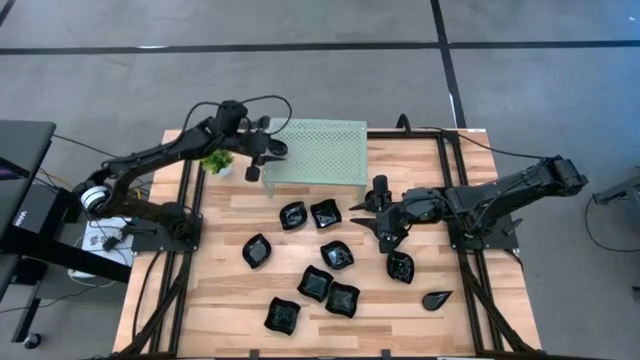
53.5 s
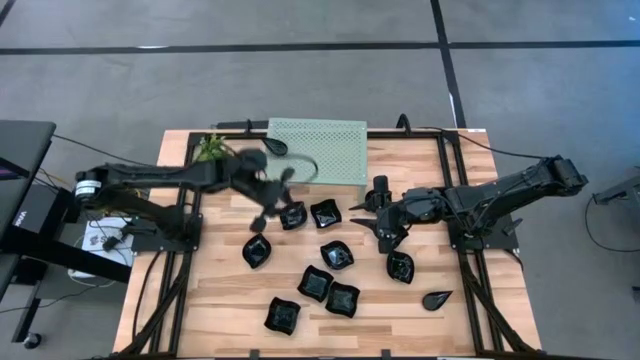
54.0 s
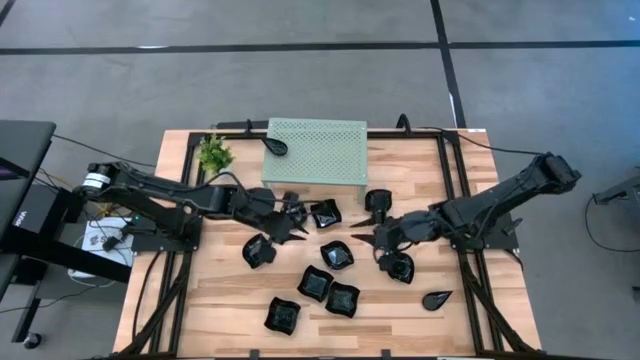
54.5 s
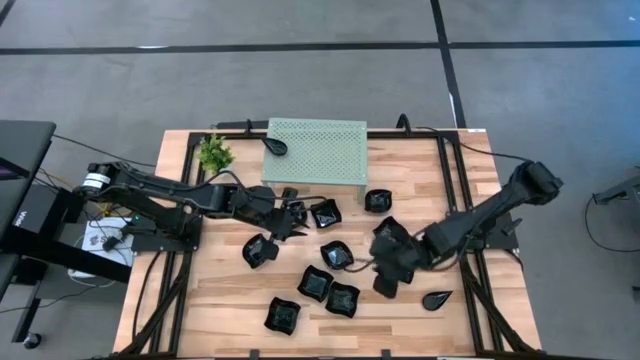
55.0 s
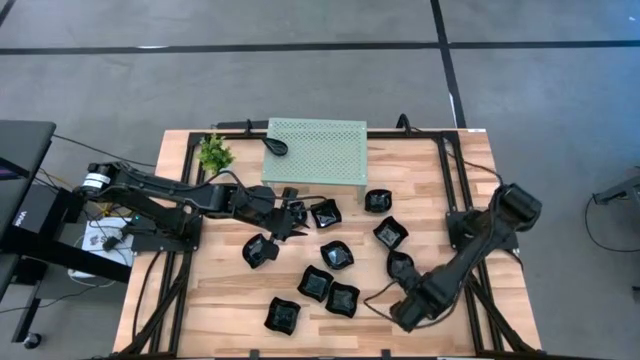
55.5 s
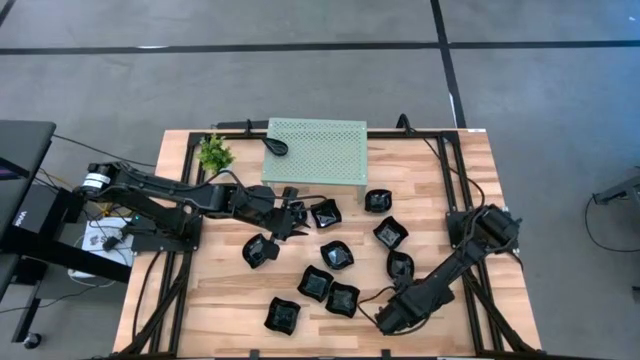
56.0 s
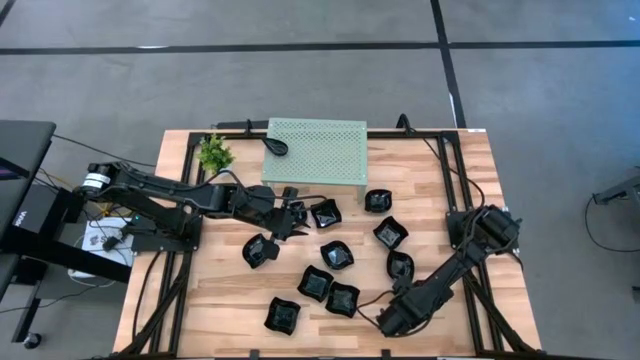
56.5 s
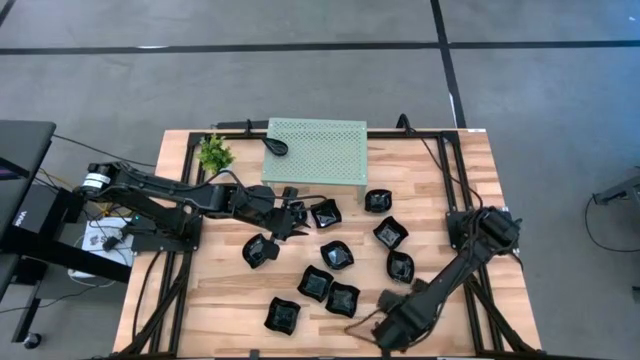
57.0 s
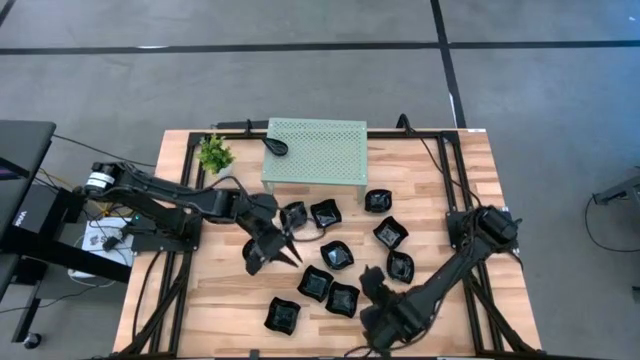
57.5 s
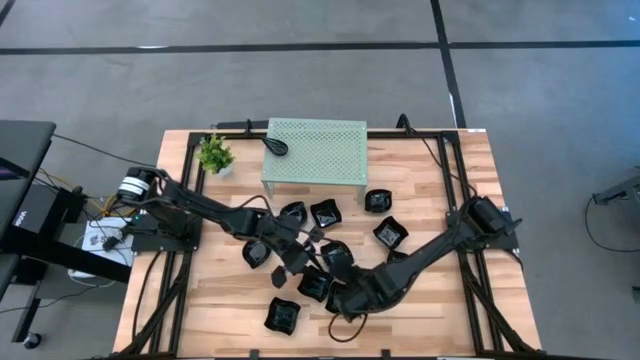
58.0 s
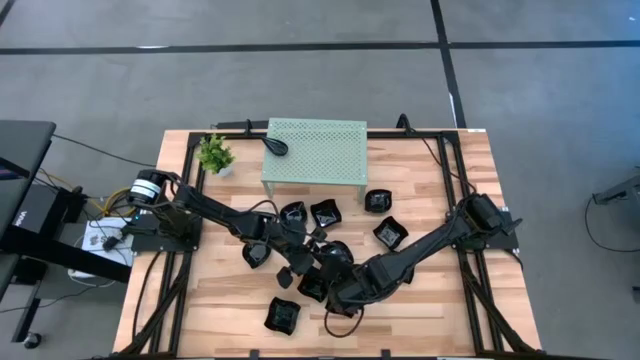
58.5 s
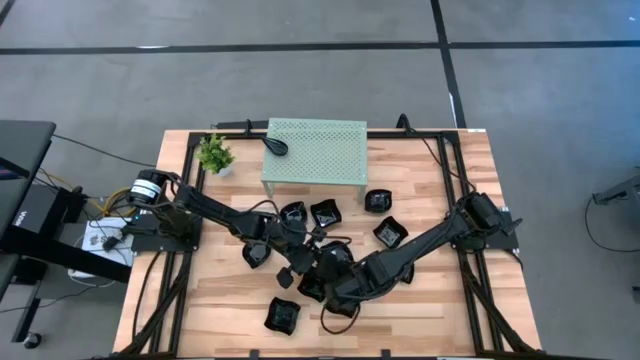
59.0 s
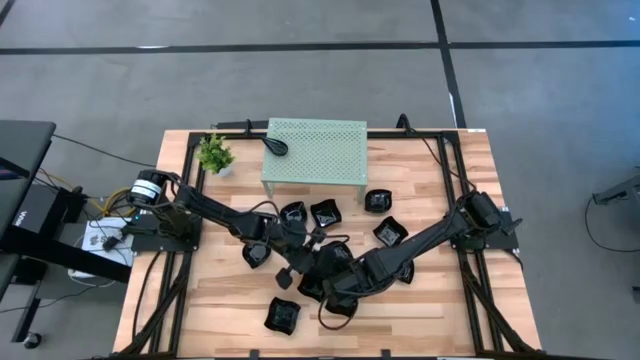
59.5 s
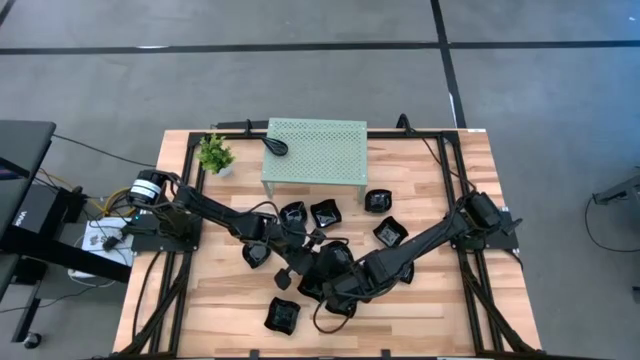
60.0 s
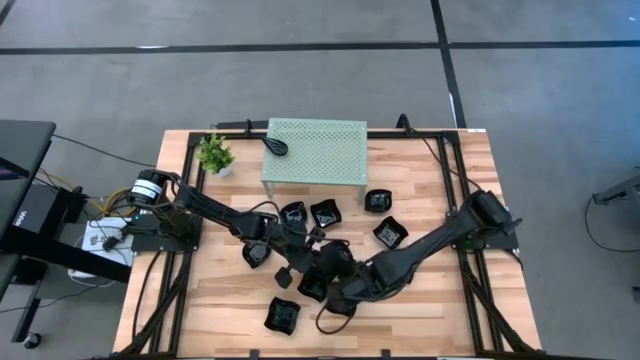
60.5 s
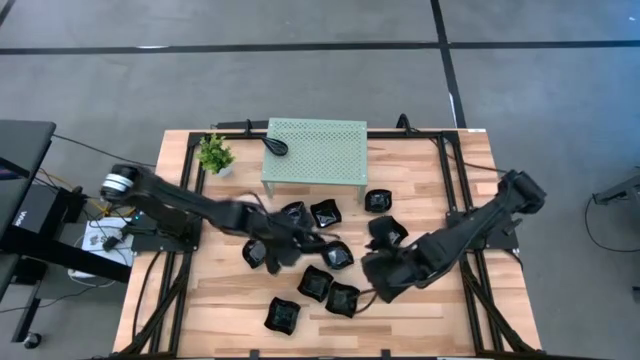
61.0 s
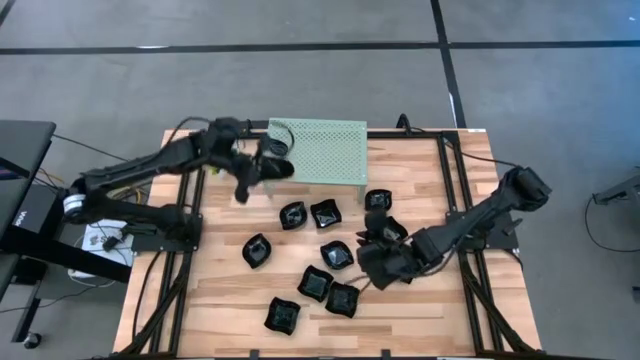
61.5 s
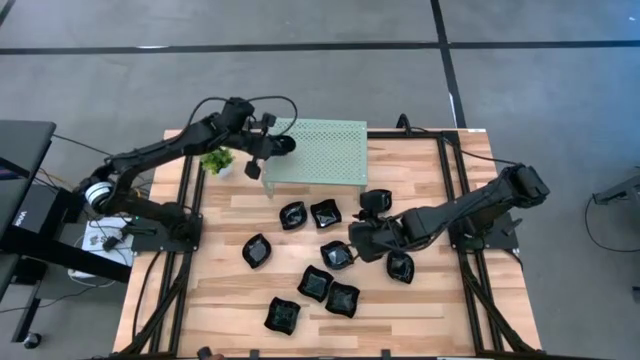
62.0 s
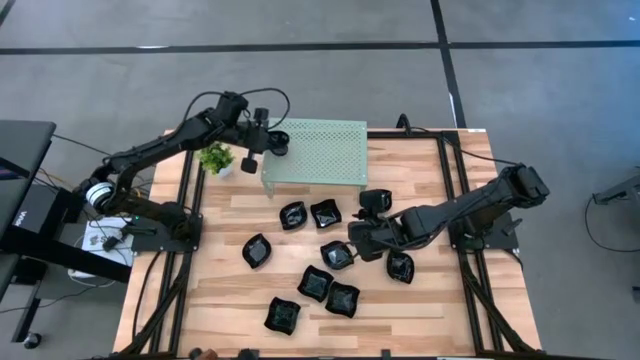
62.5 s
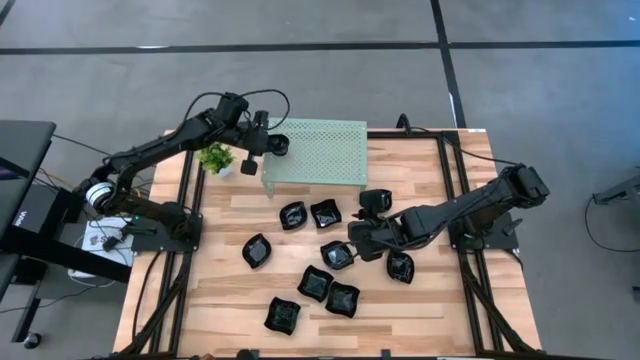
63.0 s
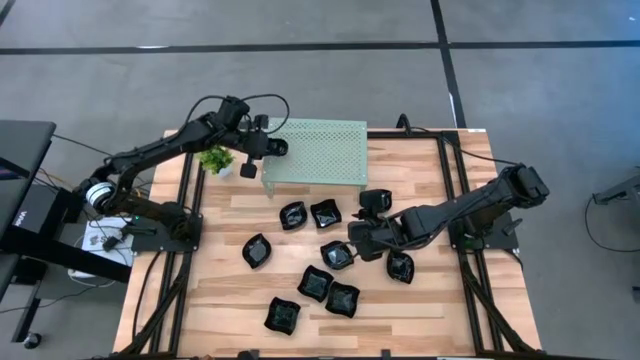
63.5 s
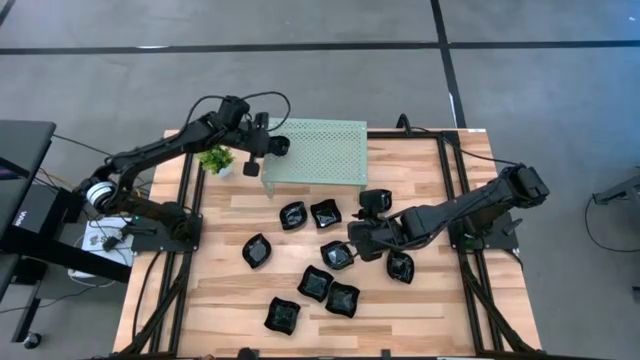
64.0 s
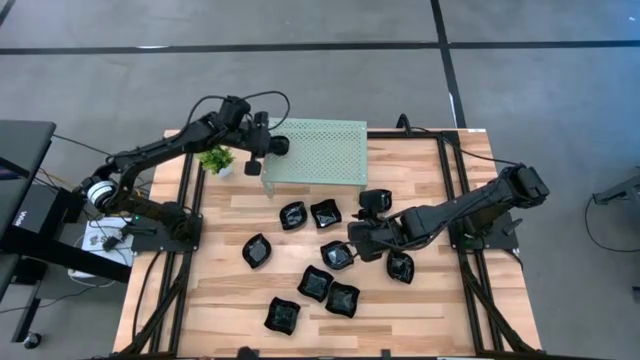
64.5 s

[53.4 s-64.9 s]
Task: Pick & Place Mini shaped plates
Stack the drop shaped plate on top of the other drop shaped plate on the shelf

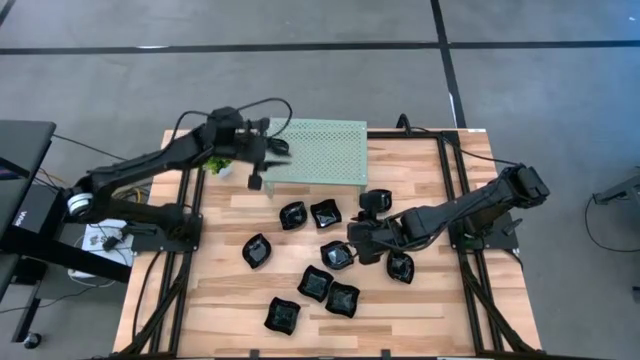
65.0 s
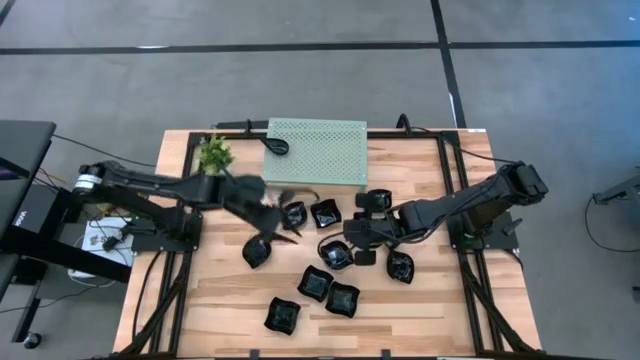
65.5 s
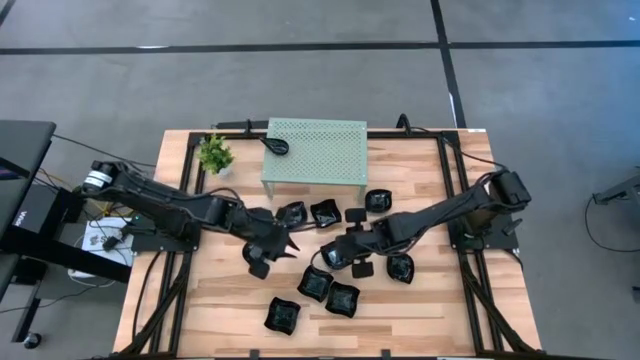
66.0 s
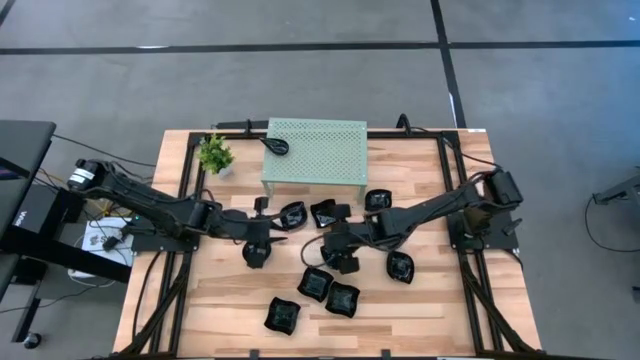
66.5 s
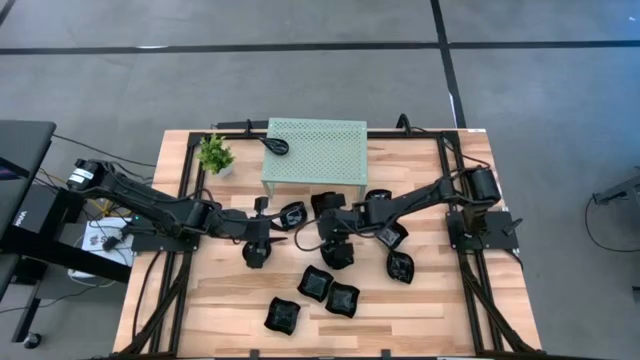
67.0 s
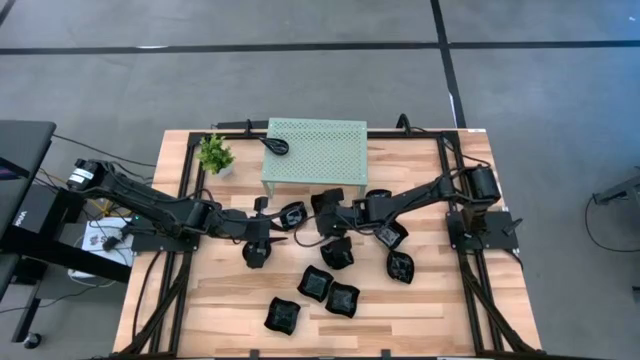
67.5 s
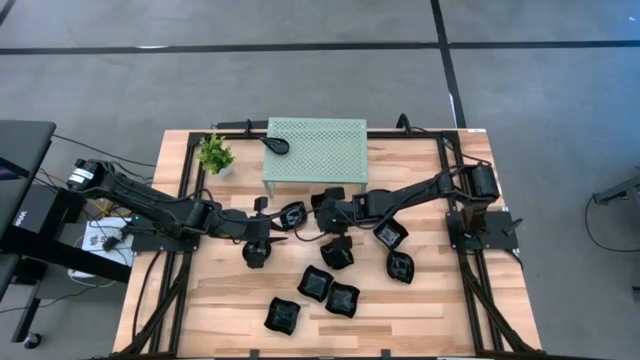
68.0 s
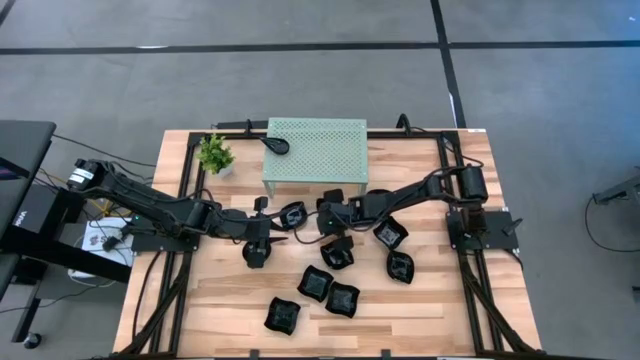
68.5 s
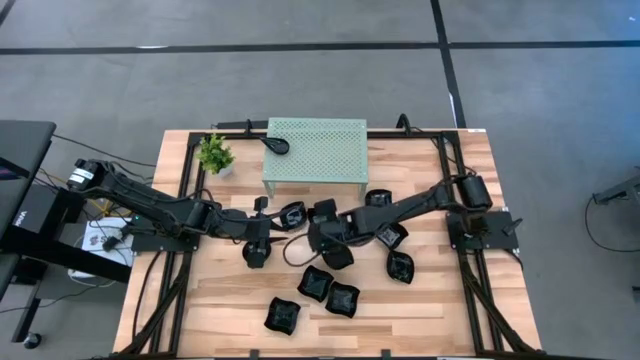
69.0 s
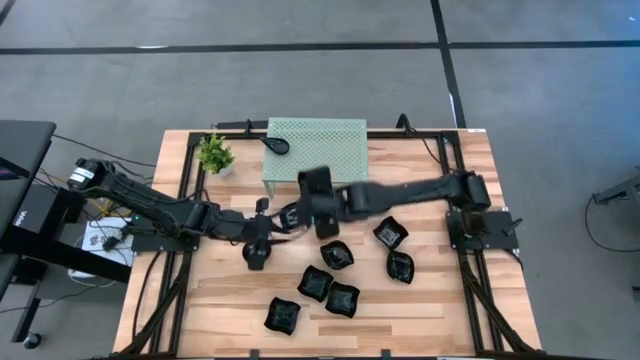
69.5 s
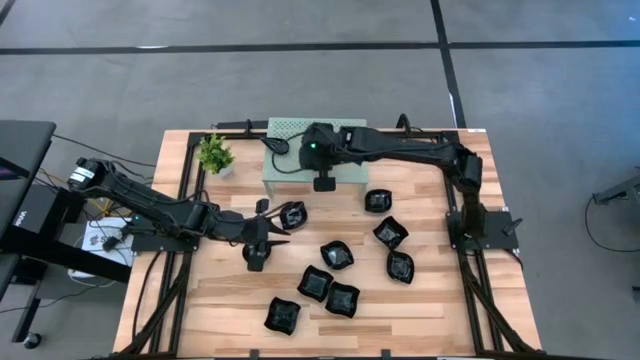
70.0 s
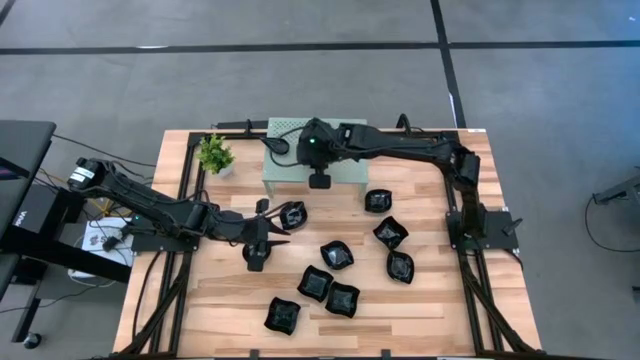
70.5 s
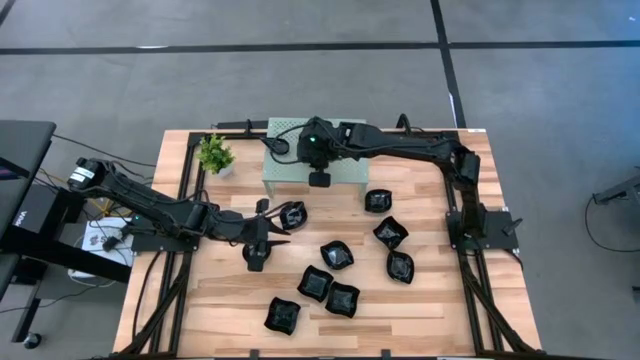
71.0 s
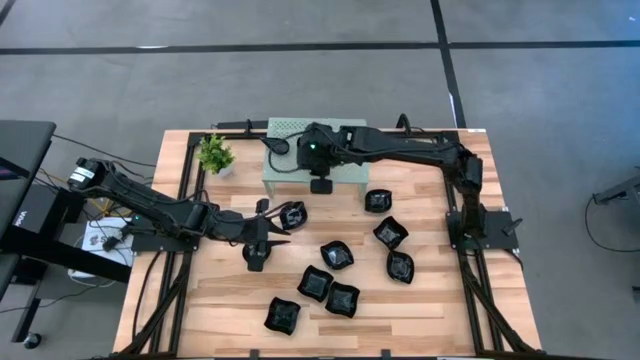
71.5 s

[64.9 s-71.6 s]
Put the distorted square plate on the shelf

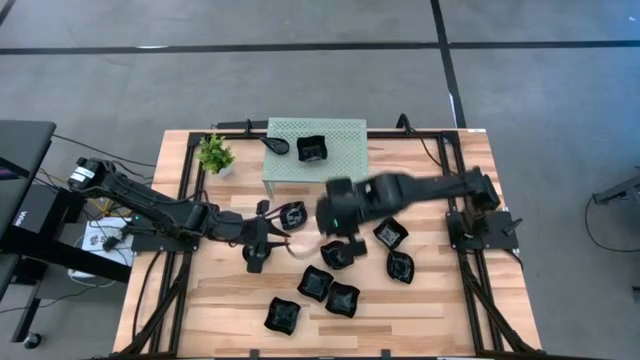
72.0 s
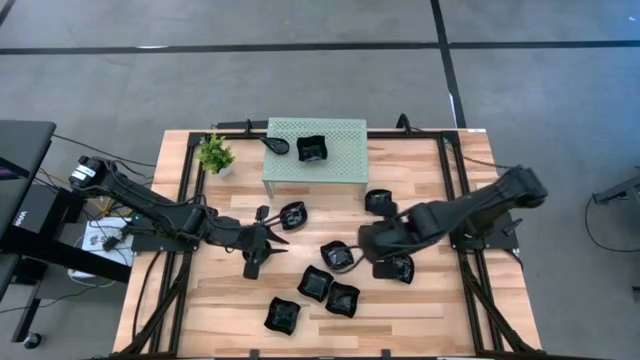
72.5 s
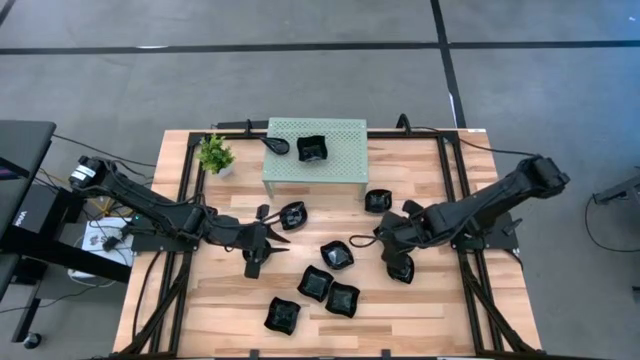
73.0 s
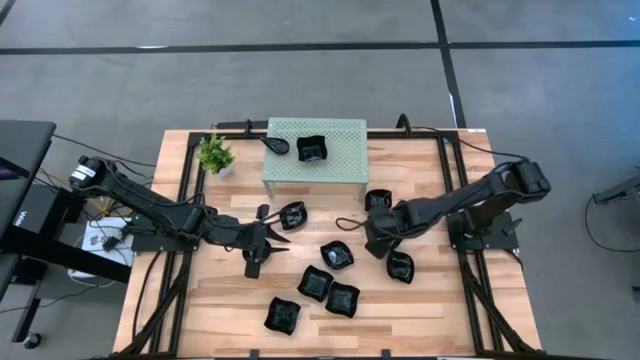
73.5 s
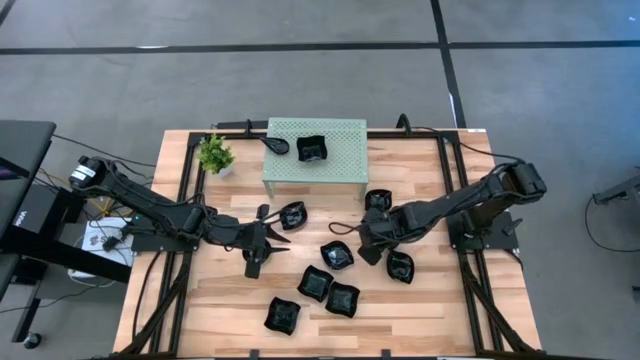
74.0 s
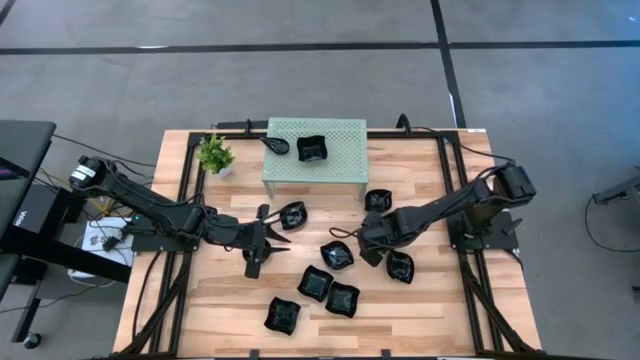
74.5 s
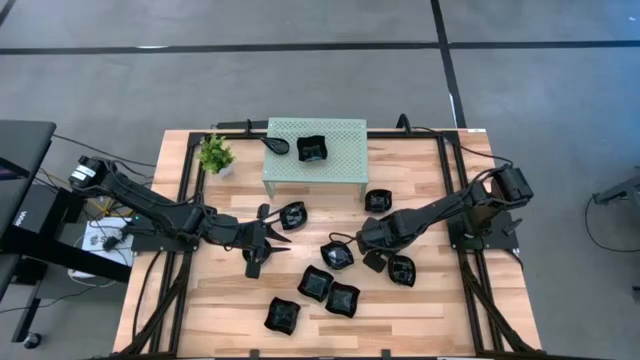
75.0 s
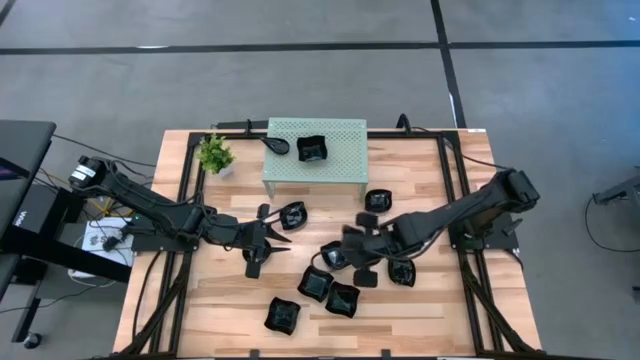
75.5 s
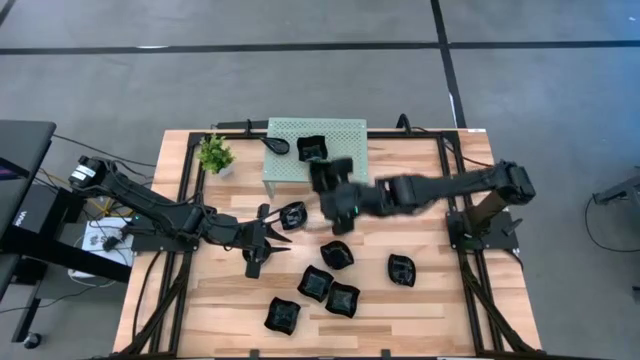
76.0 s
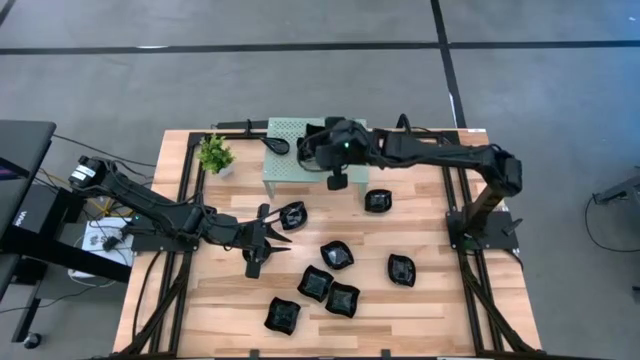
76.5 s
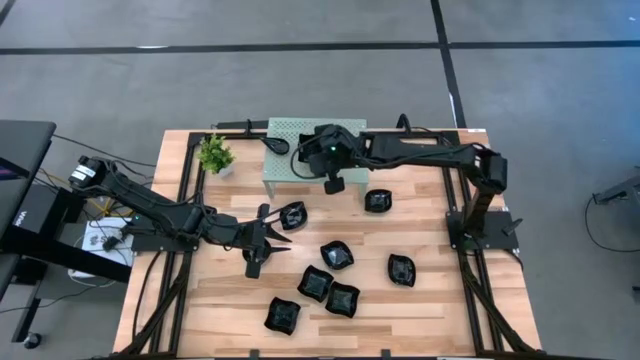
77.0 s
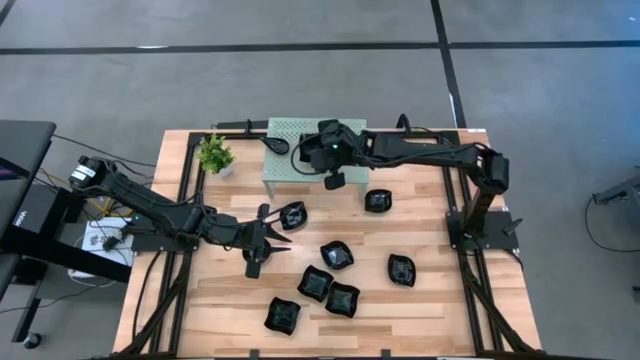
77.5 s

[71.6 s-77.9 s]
Stack the distorted square plate on top of the other distorted square plate on the shelf
